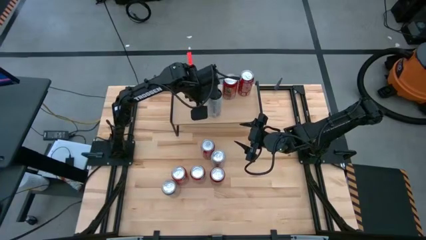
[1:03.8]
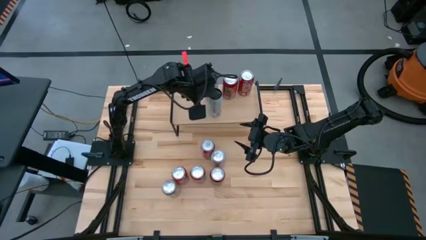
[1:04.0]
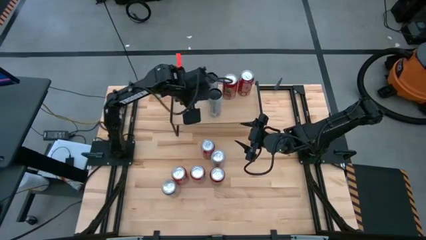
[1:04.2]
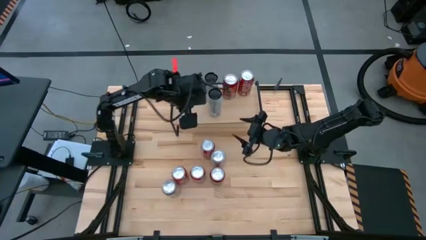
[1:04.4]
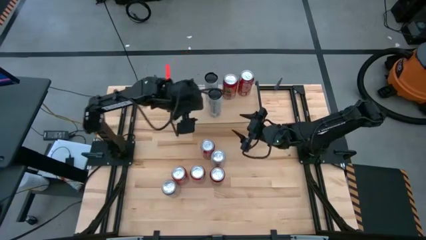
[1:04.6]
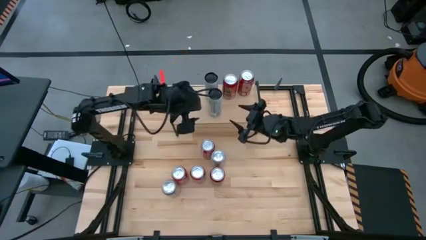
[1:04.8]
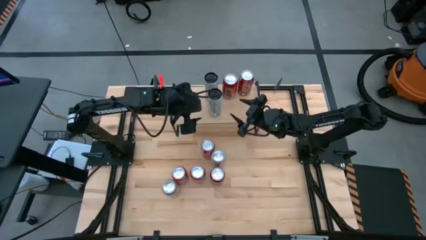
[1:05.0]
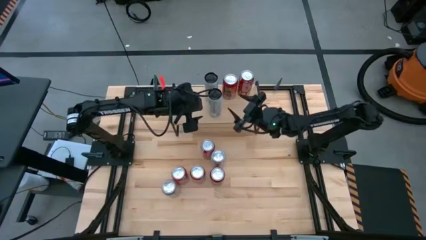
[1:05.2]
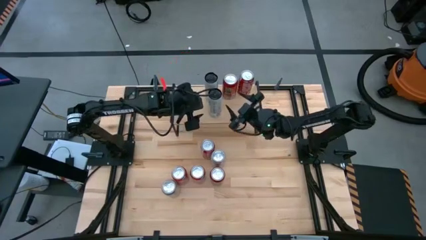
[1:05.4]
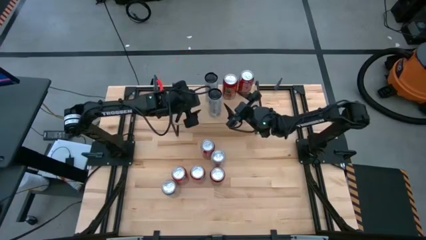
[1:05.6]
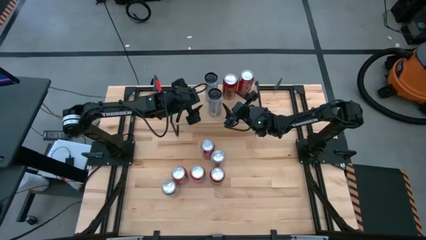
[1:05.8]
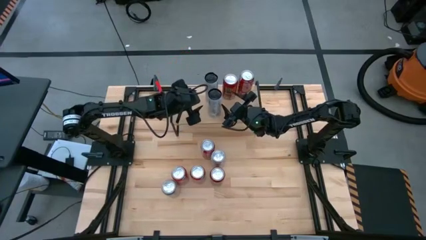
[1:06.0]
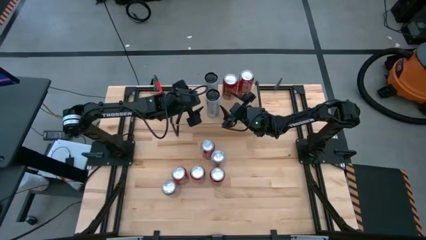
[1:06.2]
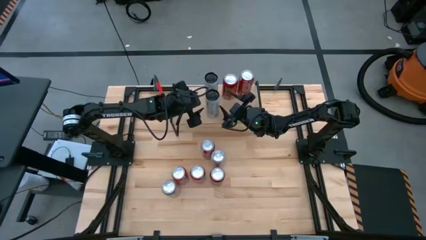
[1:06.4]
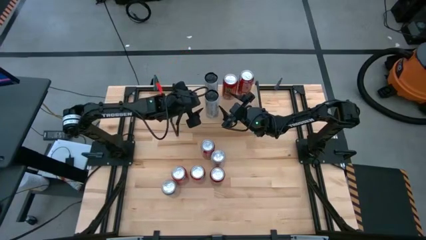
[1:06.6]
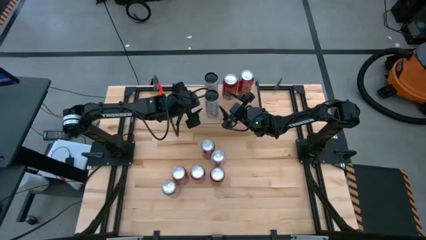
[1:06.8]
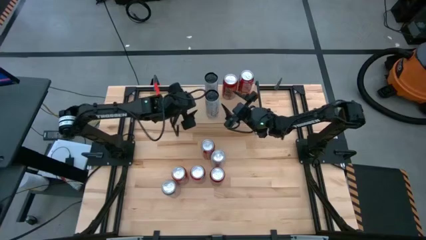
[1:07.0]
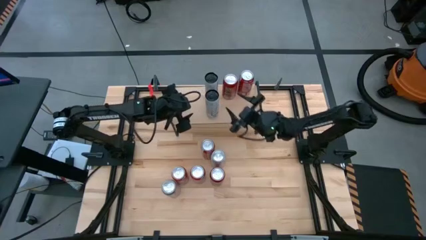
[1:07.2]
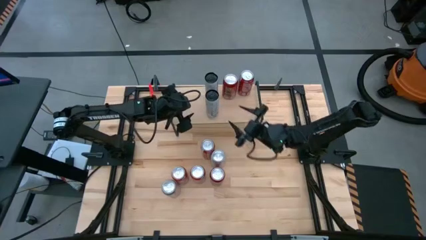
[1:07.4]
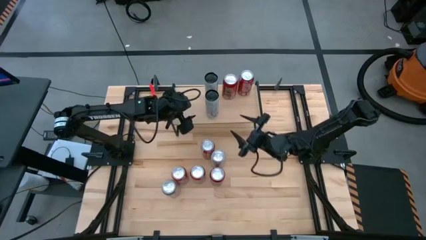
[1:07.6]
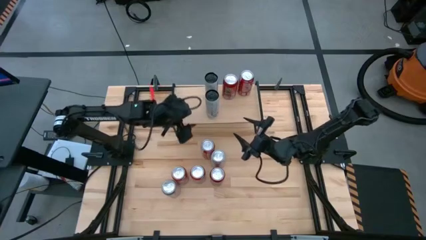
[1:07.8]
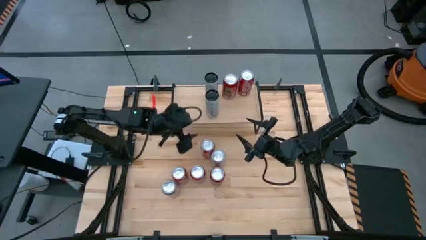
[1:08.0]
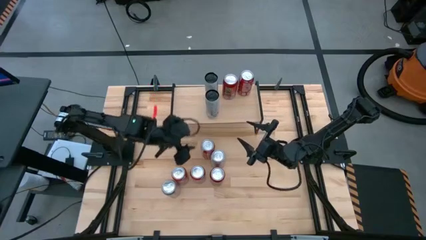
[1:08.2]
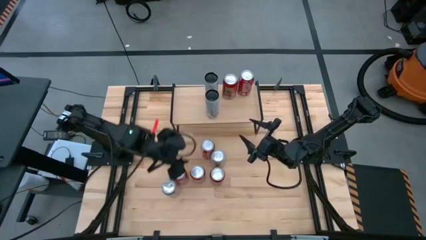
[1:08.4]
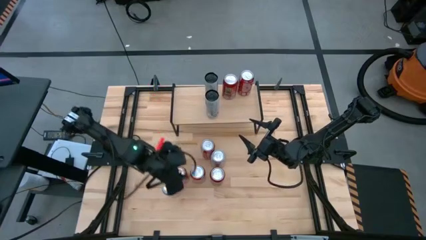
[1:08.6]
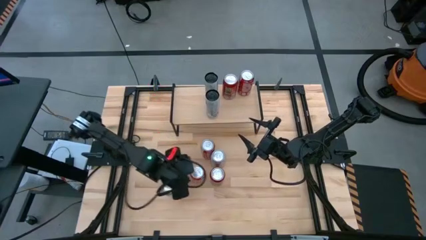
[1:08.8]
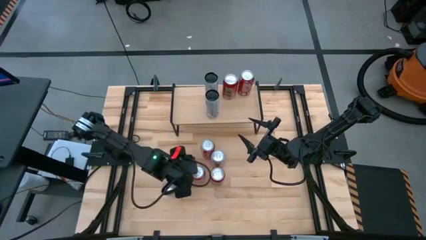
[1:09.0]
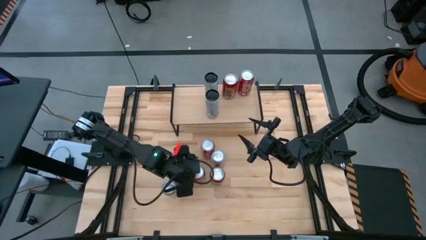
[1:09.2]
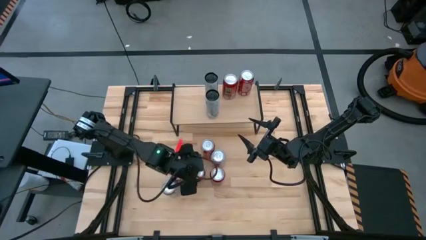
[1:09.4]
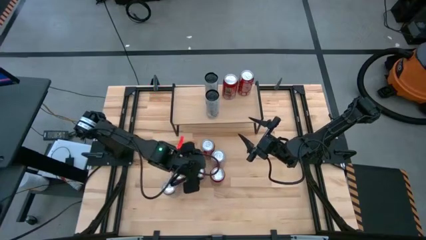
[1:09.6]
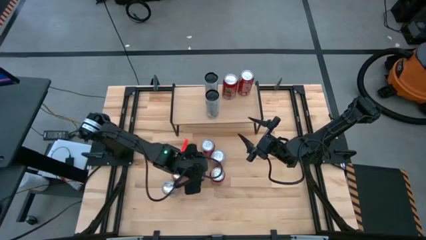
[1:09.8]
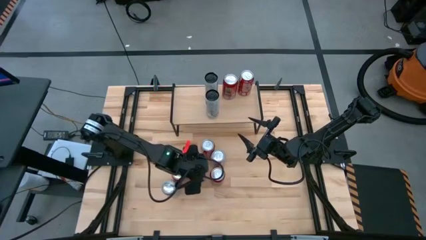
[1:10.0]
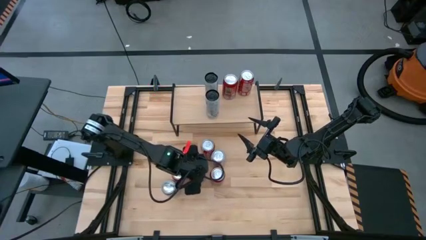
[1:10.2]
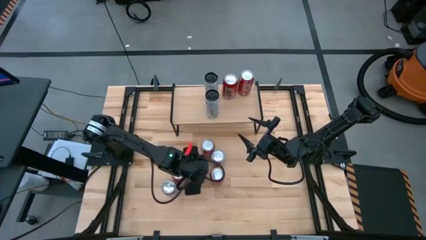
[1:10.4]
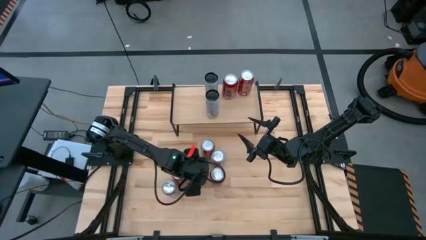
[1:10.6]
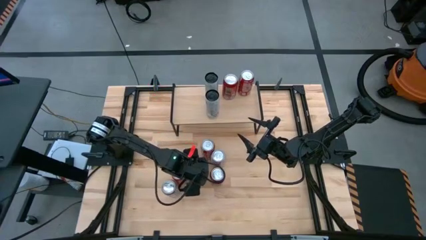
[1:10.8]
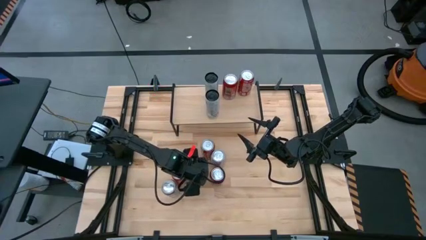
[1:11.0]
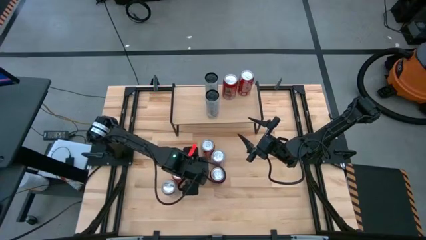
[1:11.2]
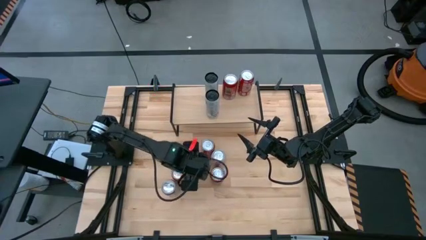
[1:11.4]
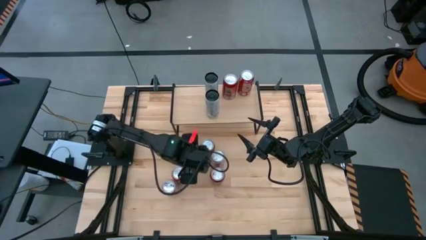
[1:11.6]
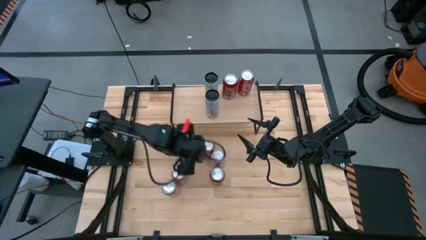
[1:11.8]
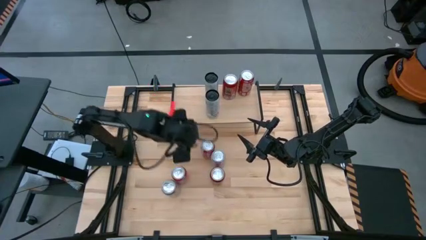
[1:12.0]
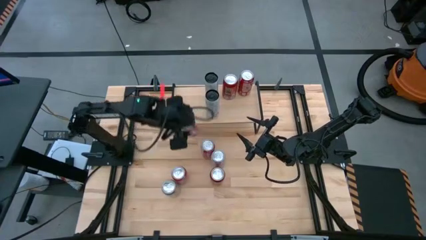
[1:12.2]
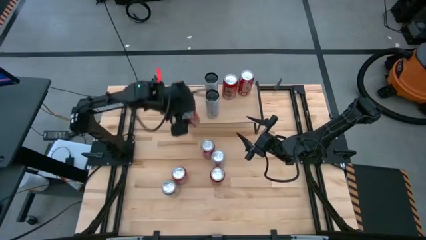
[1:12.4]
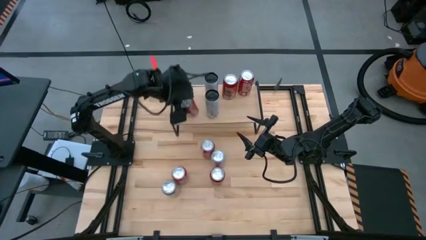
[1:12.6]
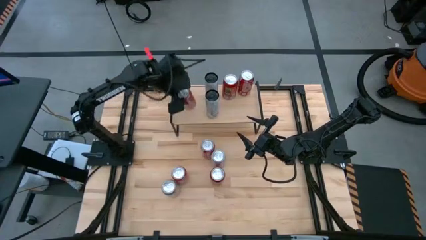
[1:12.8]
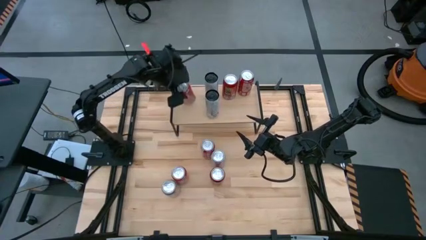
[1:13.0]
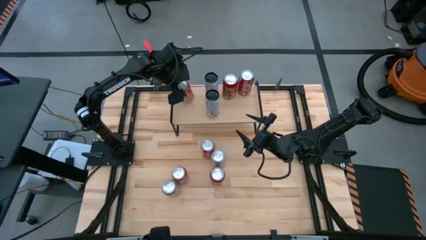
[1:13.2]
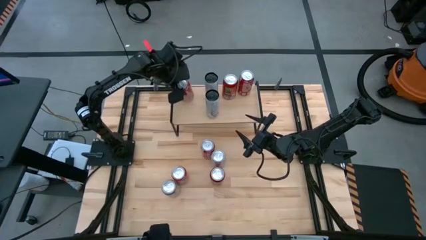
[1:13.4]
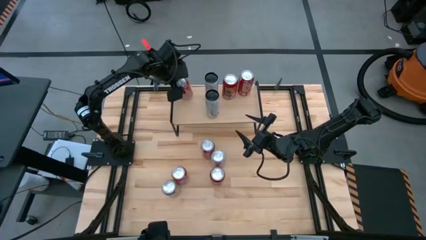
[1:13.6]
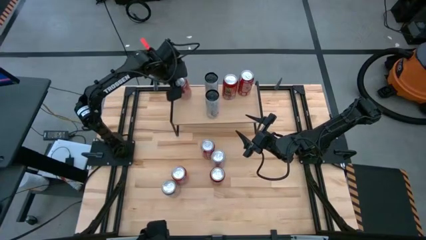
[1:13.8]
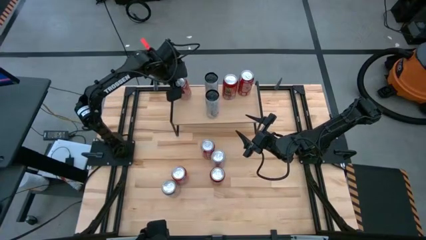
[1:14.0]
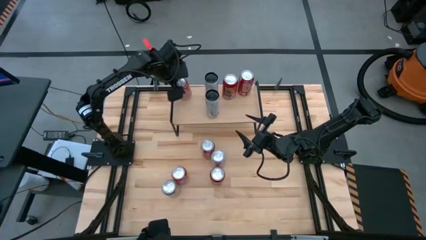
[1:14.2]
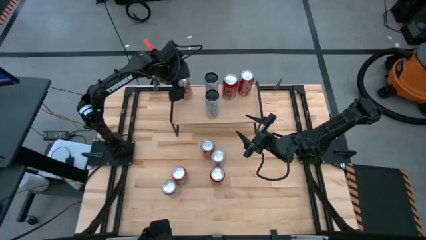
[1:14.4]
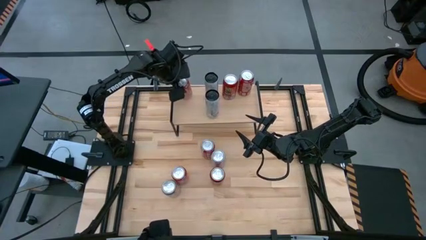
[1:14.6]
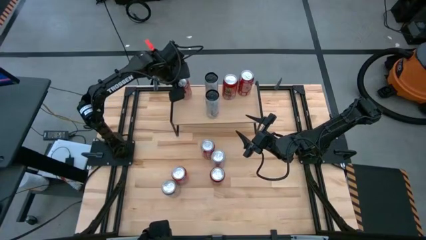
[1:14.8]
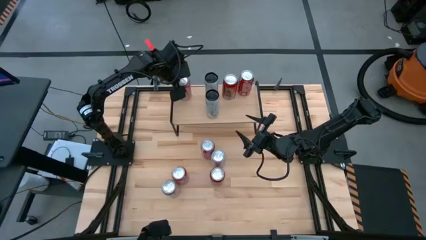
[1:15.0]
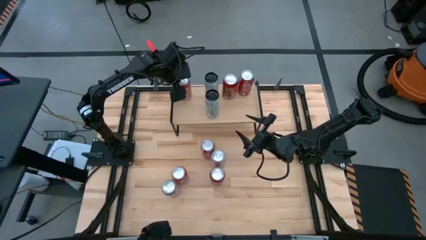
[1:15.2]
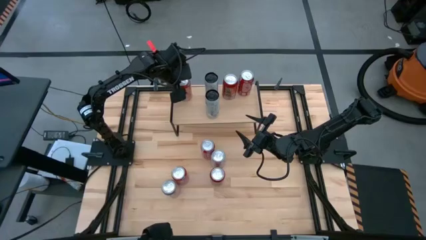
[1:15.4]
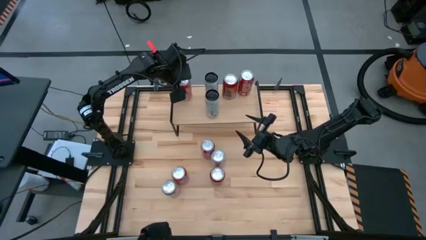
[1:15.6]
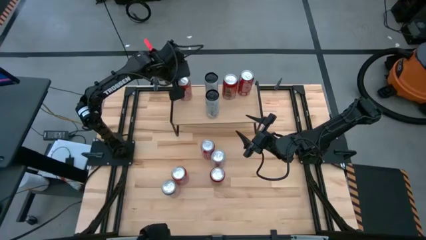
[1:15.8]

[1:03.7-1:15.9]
Task: Place canned beverage on shelf
Put the orange soda can on the shelf

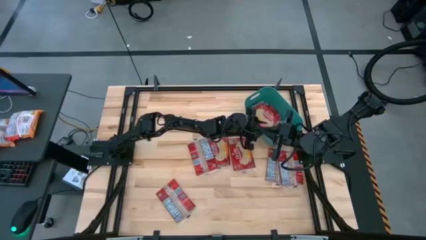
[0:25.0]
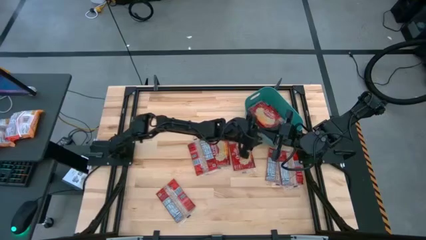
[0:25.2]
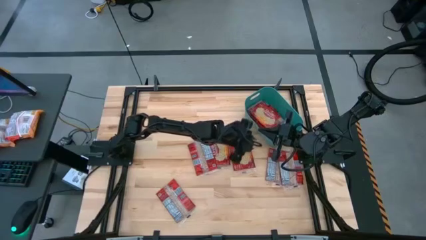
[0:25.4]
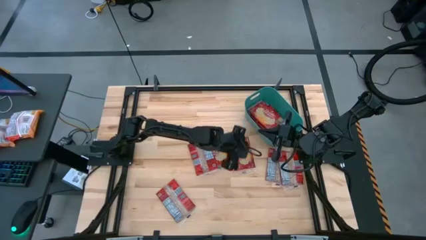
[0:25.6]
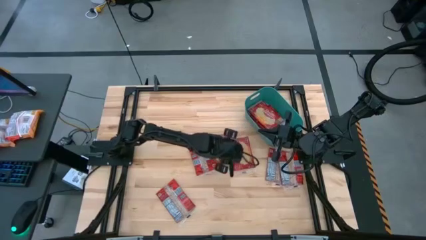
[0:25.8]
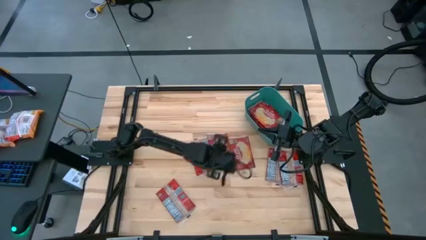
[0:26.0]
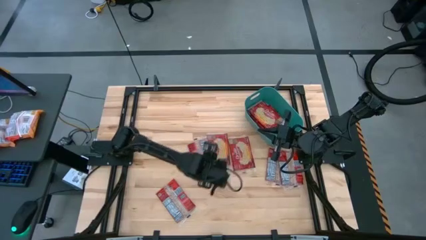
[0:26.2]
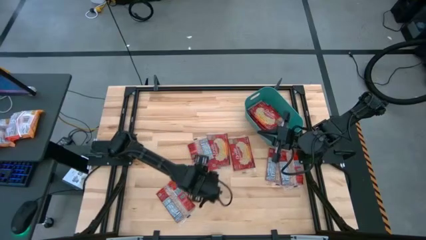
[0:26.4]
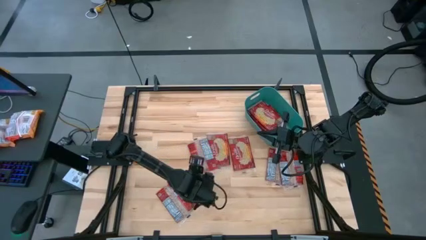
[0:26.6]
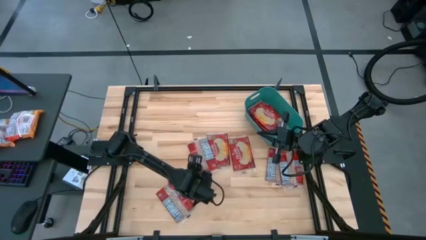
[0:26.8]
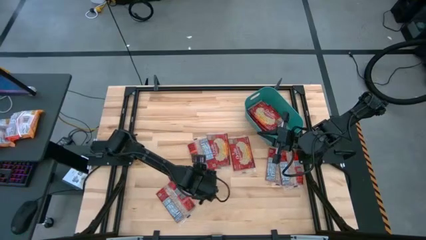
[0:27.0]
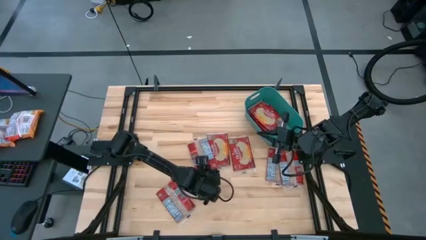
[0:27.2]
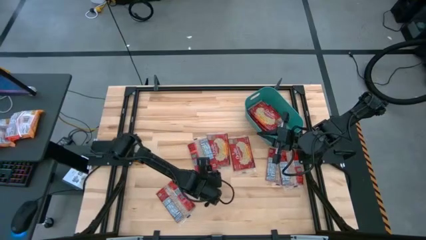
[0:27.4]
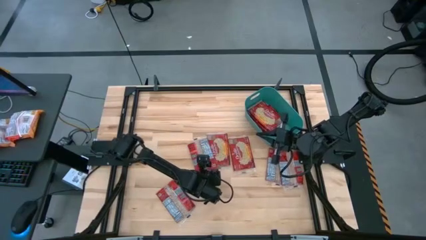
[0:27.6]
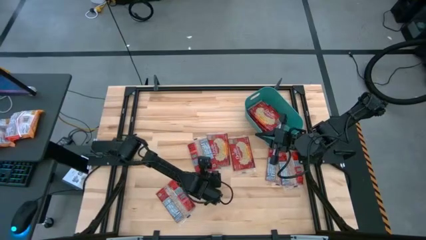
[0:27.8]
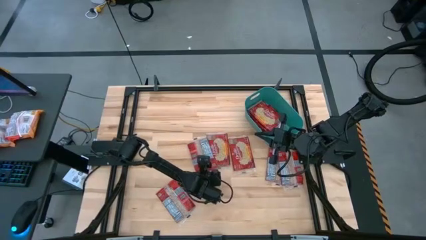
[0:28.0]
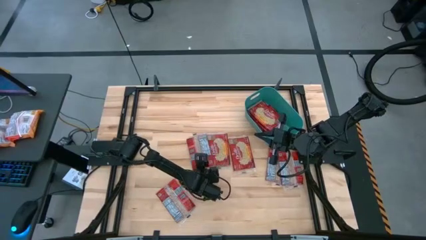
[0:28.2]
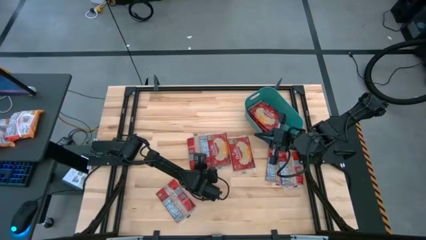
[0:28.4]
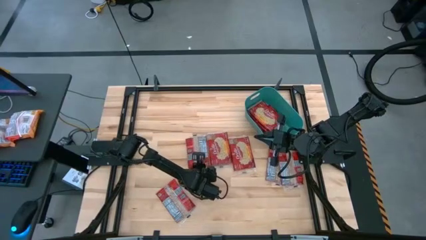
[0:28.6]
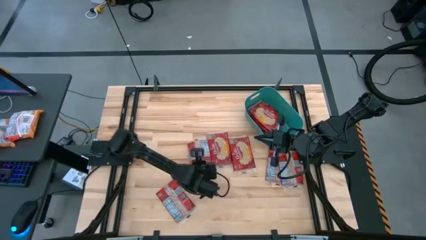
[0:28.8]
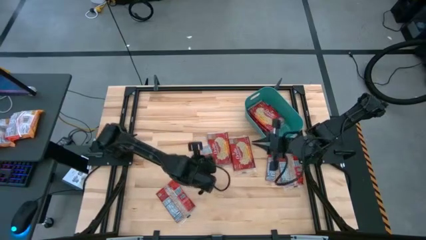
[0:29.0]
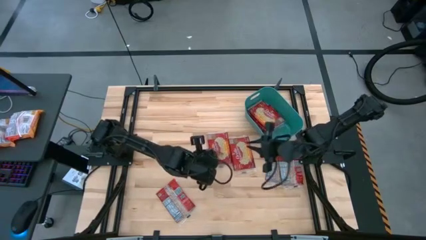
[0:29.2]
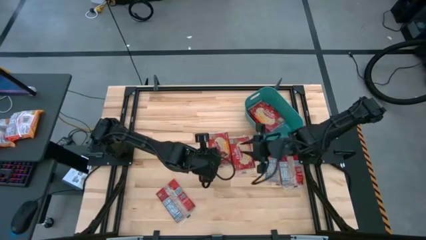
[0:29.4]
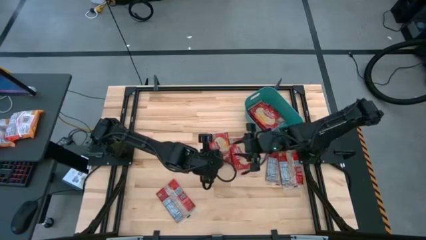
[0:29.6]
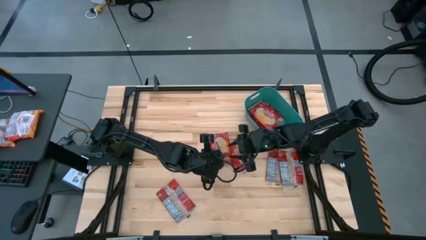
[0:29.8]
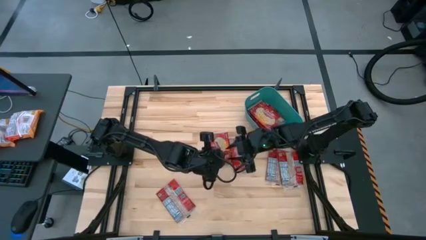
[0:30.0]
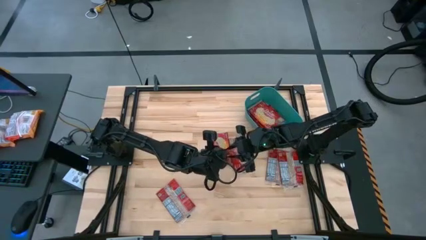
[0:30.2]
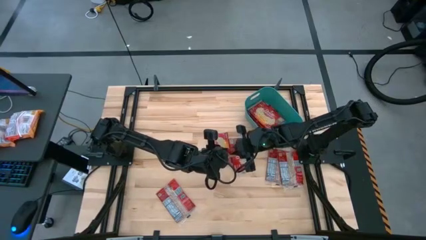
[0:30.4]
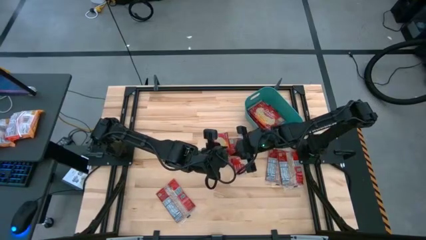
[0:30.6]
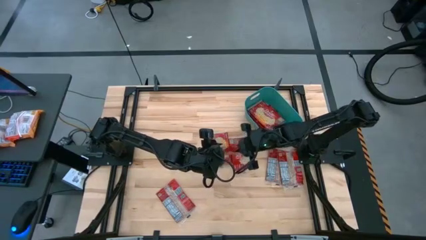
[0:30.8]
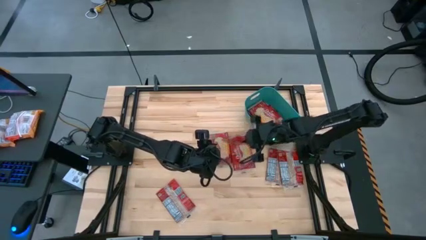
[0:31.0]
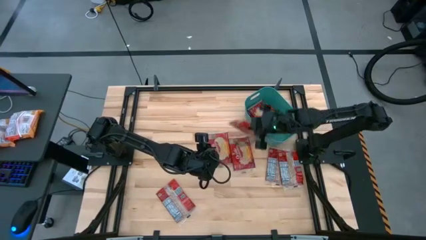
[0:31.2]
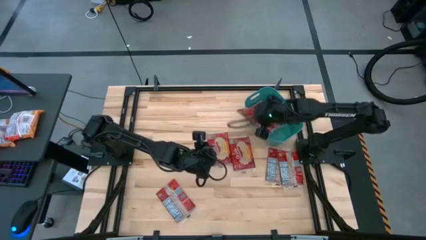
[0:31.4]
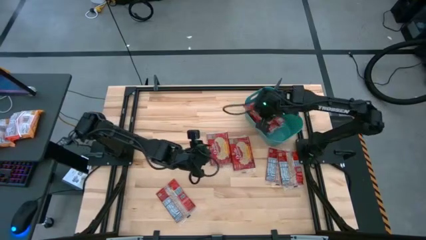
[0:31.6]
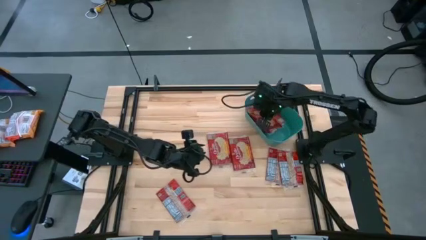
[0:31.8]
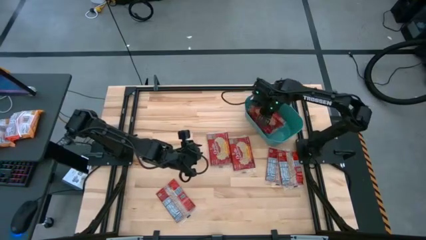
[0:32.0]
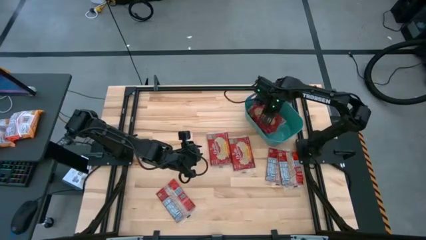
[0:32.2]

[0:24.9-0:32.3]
Task: Sort popcorn bags into baskets
Put the red popcorn bag into the green bin
